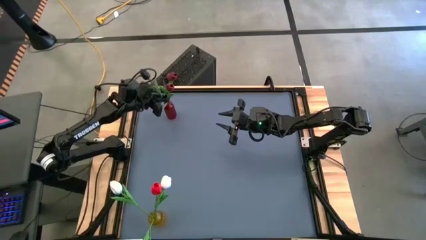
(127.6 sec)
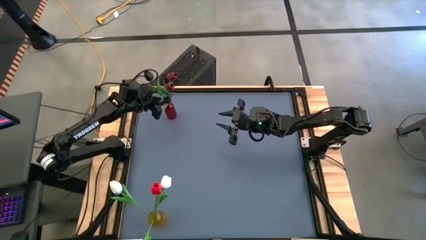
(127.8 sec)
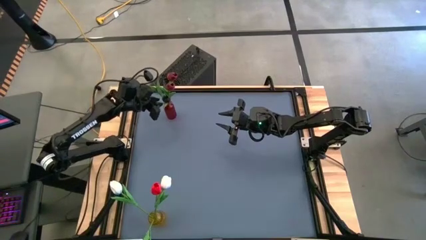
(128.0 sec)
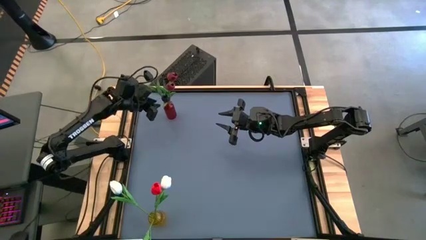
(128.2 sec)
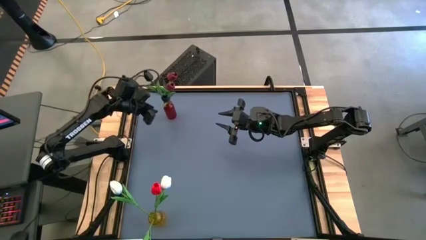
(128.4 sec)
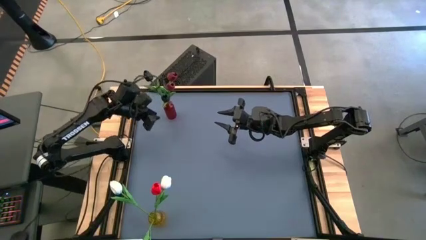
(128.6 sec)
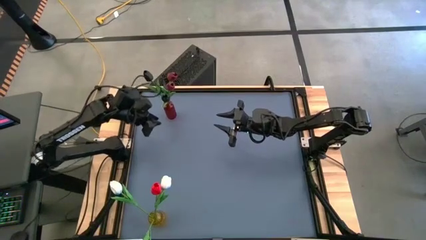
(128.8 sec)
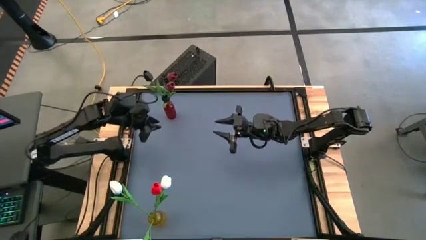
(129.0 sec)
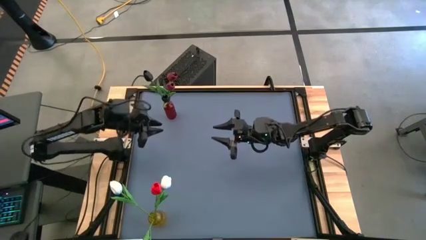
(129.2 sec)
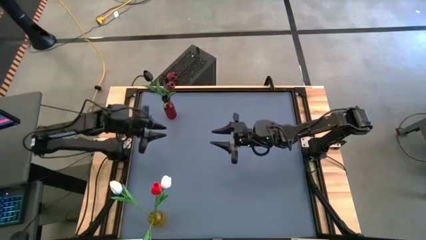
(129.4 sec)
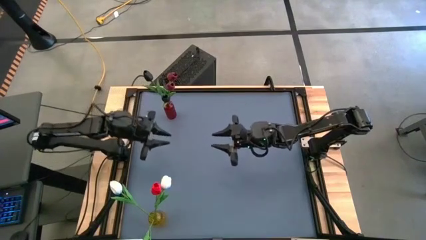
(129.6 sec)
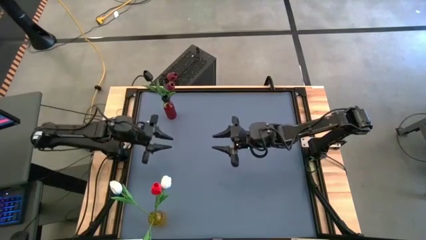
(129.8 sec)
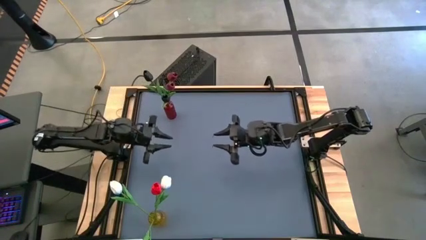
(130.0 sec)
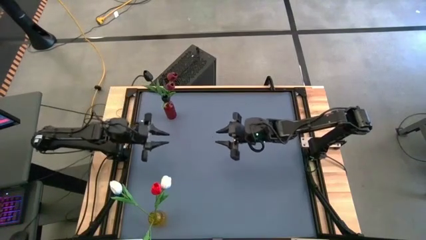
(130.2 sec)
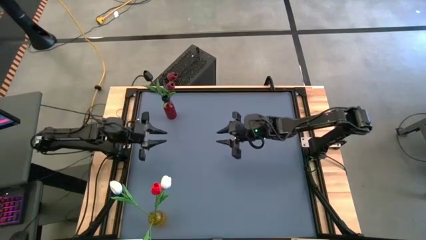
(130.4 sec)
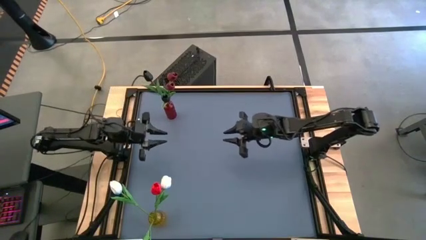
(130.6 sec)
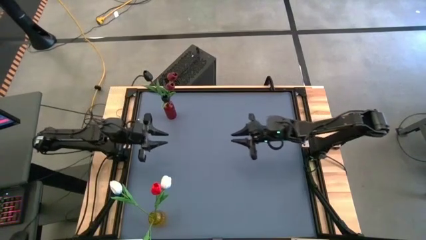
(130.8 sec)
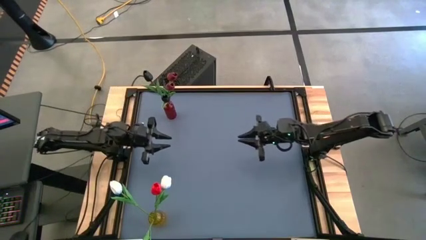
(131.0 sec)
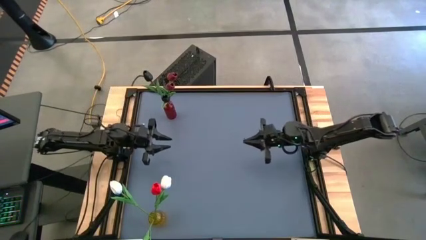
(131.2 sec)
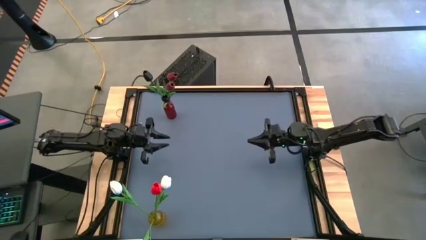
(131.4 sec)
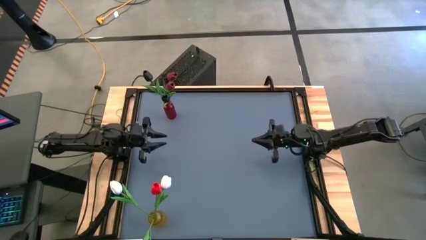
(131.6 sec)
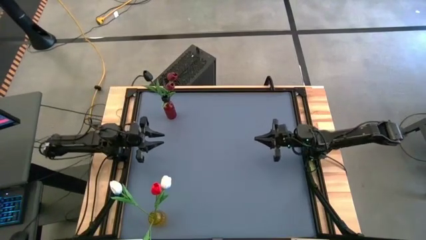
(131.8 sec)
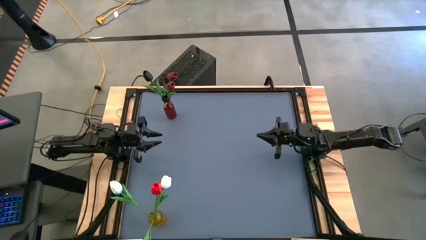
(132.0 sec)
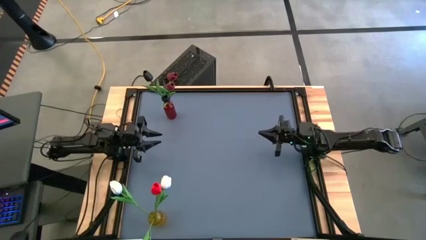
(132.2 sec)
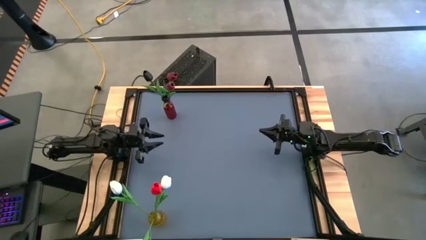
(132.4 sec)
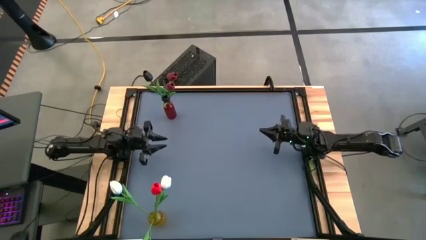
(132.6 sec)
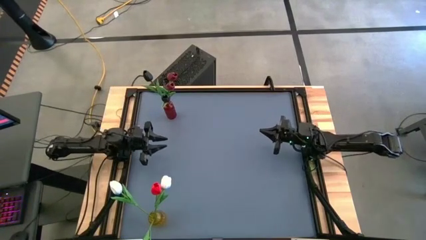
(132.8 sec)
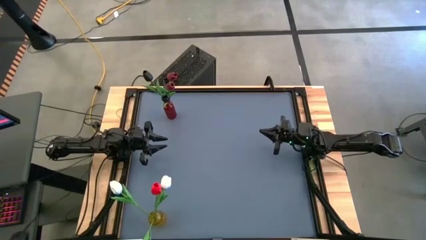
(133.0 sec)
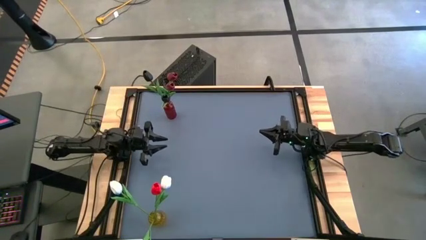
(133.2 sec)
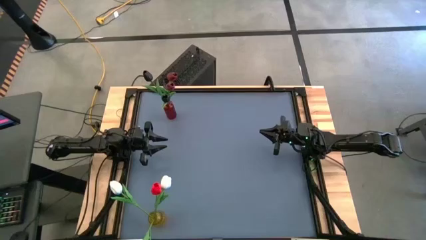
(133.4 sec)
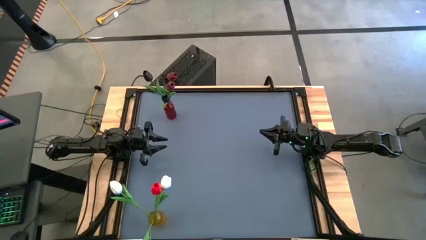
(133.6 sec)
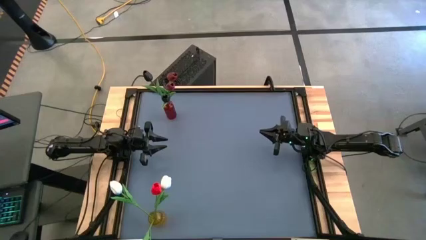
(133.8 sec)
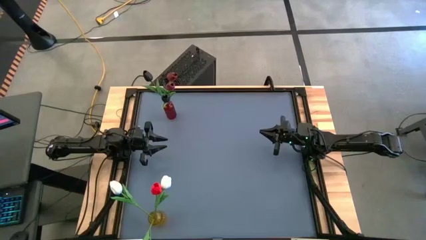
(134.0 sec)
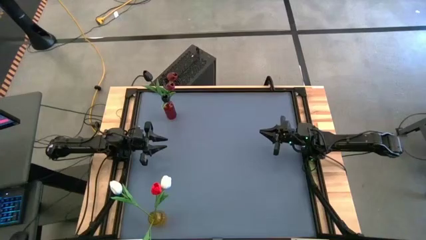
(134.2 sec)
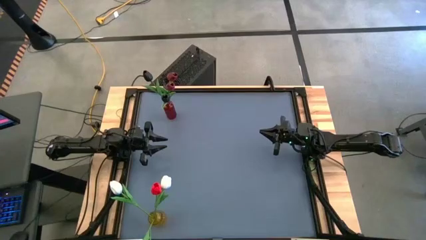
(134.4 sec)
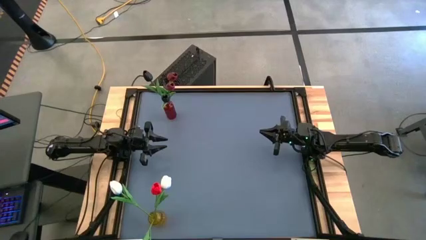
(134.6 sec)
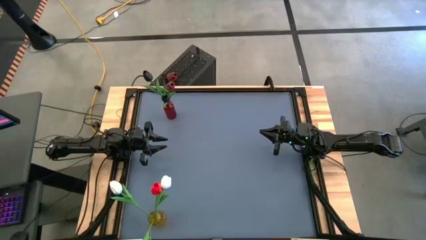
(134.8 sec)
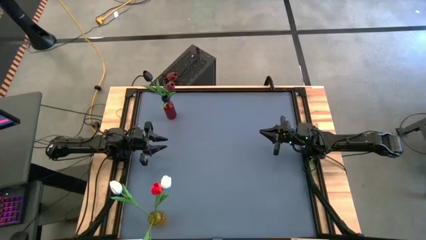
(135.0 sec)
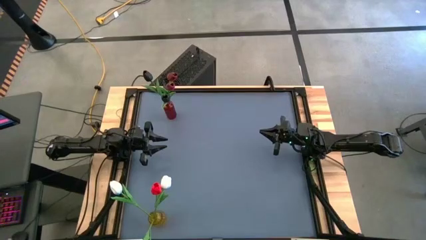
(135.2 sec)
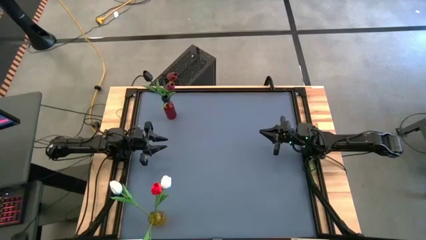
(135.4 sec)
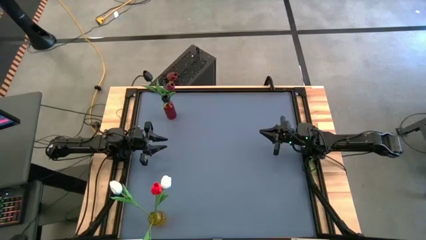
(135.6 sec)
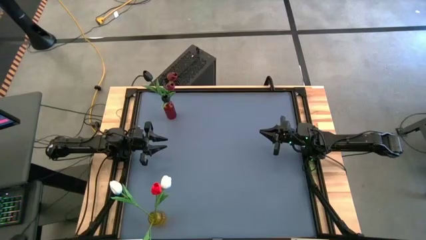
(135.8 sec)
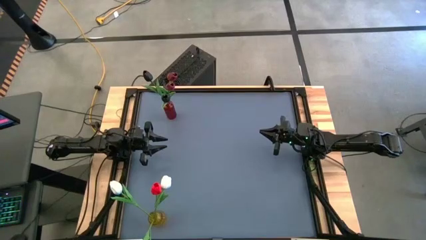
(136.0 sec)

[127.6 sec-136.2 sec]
Task: Sort flowers into vase by color
Return to Home Position
